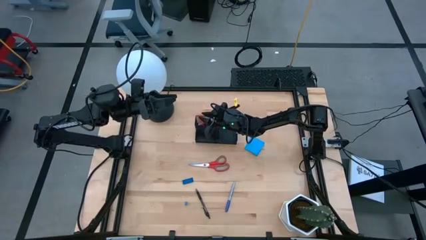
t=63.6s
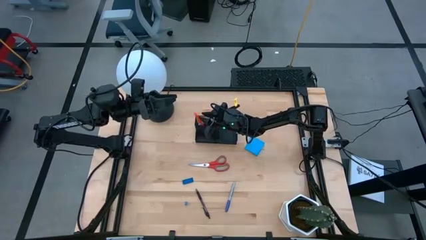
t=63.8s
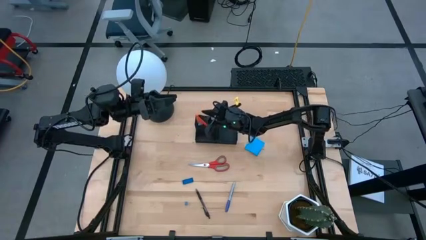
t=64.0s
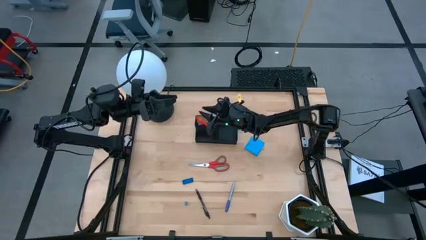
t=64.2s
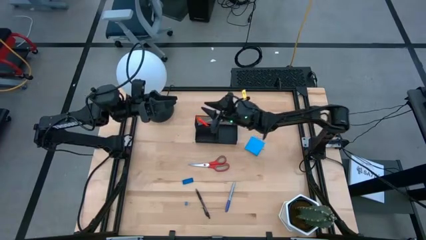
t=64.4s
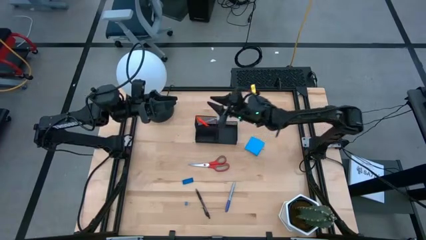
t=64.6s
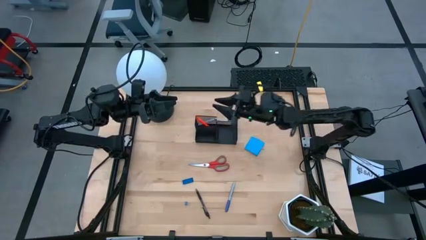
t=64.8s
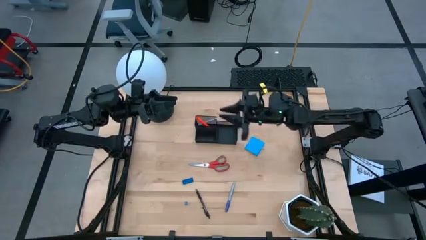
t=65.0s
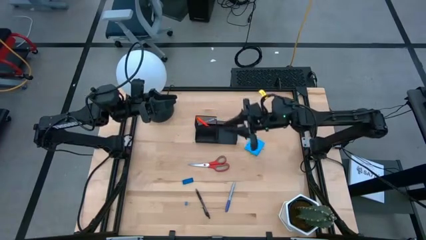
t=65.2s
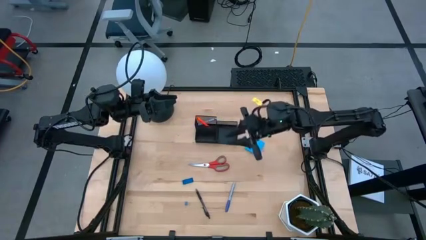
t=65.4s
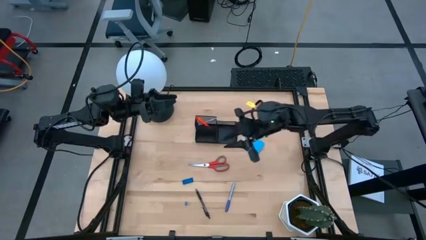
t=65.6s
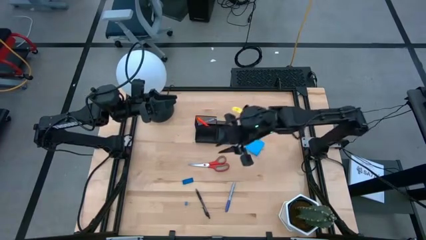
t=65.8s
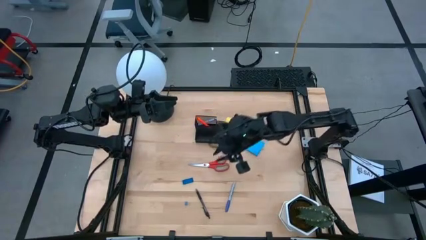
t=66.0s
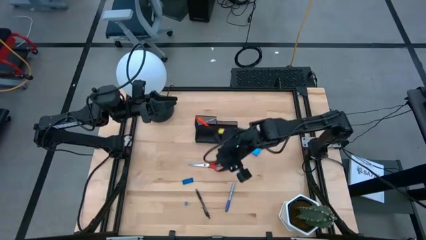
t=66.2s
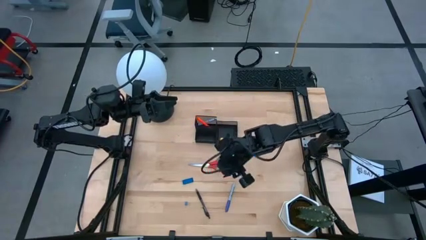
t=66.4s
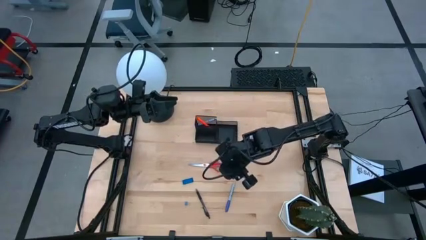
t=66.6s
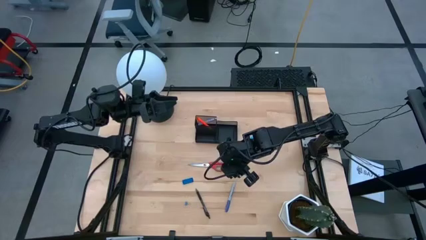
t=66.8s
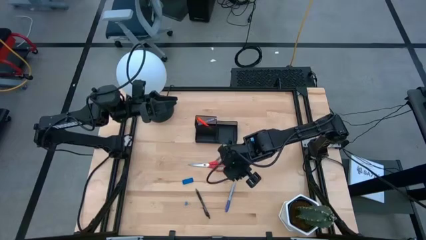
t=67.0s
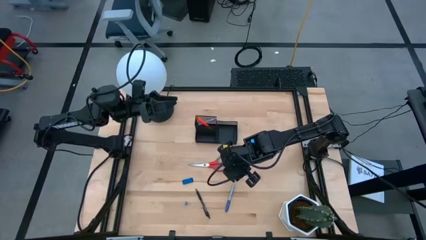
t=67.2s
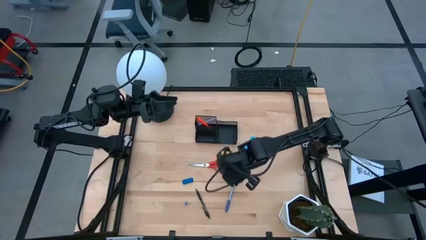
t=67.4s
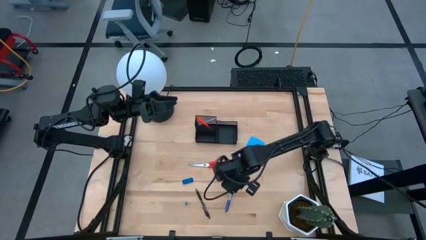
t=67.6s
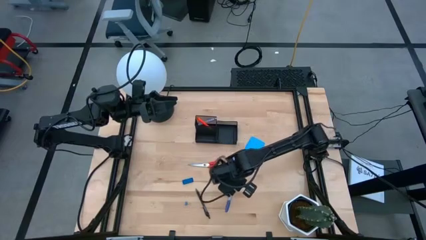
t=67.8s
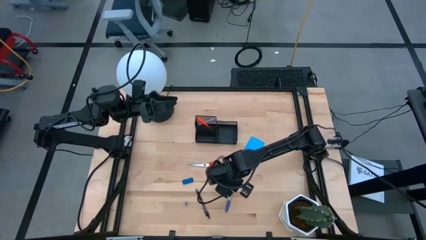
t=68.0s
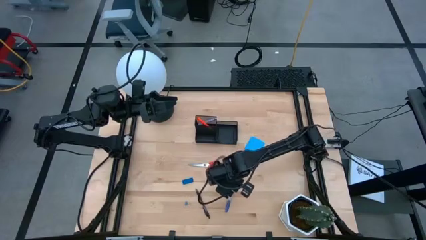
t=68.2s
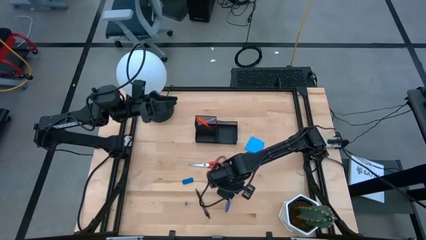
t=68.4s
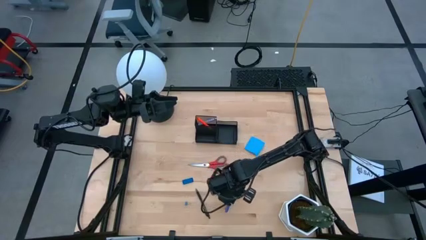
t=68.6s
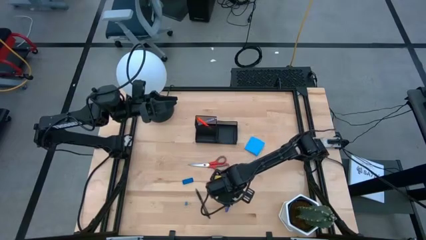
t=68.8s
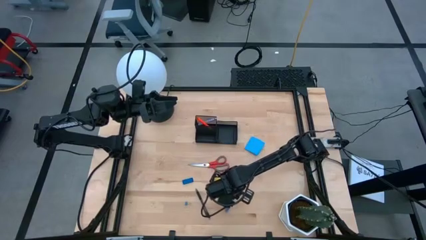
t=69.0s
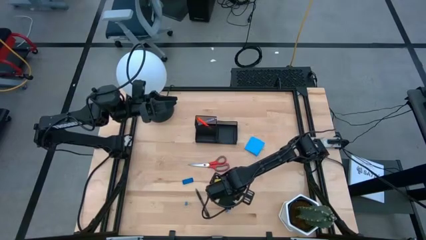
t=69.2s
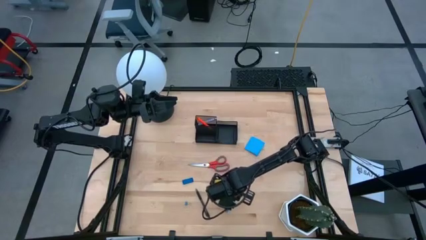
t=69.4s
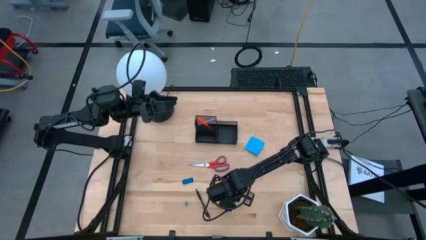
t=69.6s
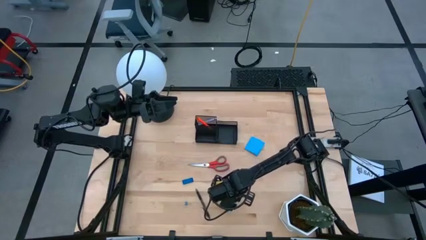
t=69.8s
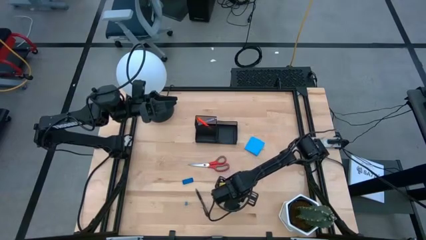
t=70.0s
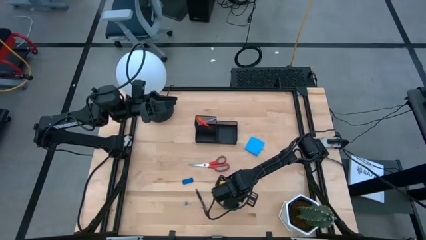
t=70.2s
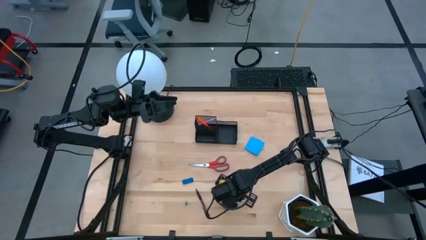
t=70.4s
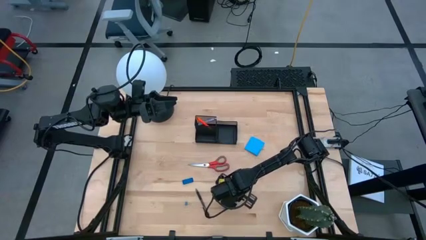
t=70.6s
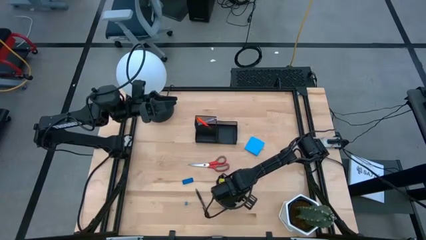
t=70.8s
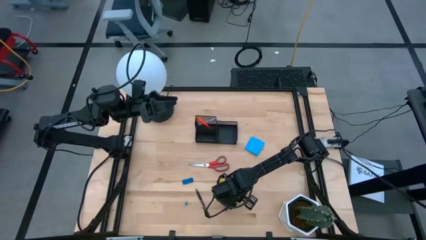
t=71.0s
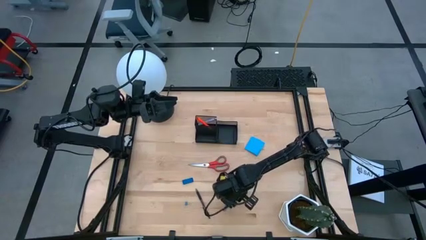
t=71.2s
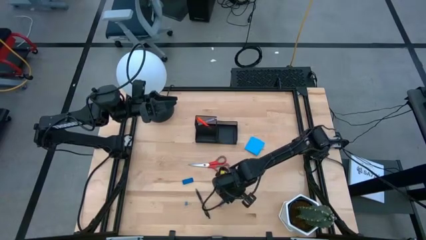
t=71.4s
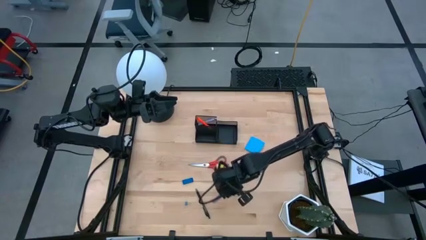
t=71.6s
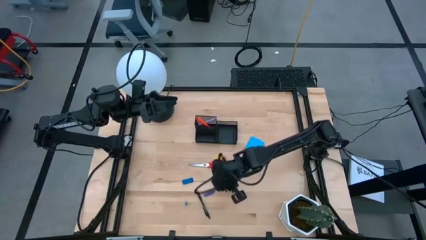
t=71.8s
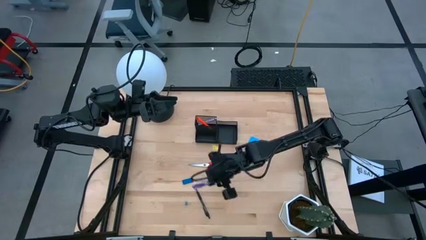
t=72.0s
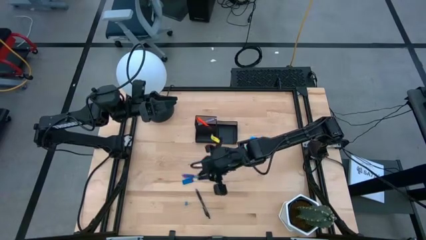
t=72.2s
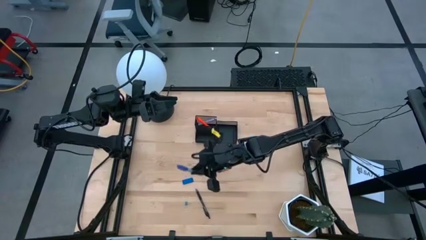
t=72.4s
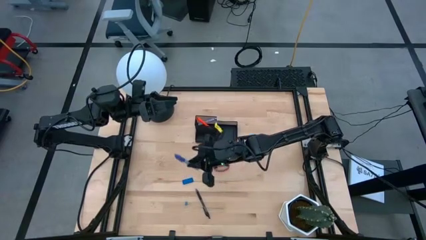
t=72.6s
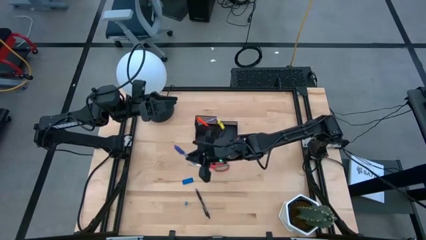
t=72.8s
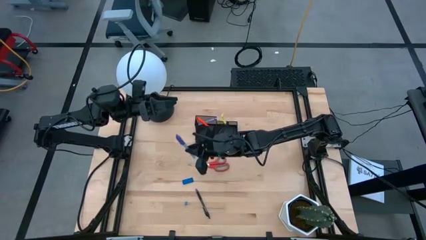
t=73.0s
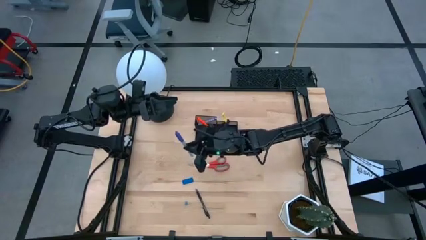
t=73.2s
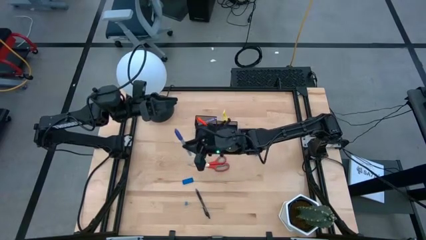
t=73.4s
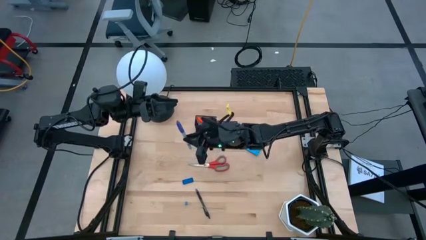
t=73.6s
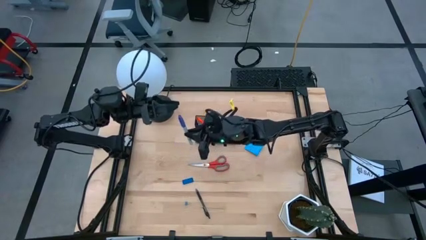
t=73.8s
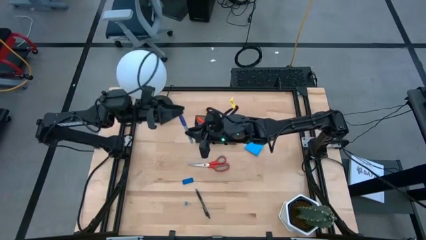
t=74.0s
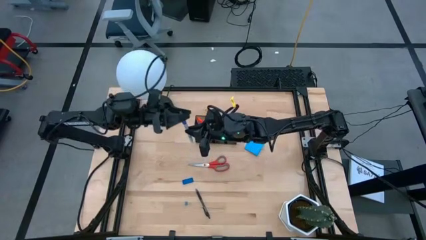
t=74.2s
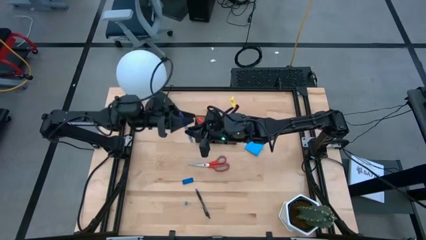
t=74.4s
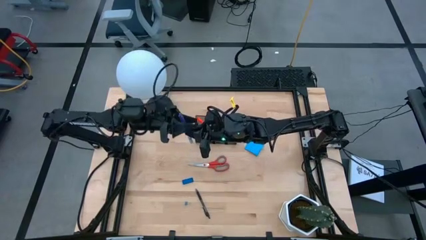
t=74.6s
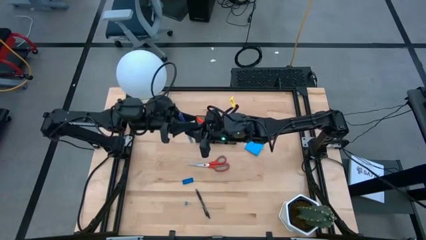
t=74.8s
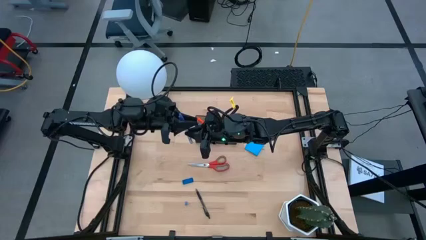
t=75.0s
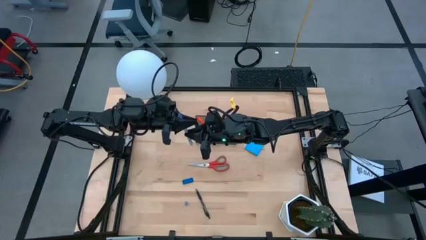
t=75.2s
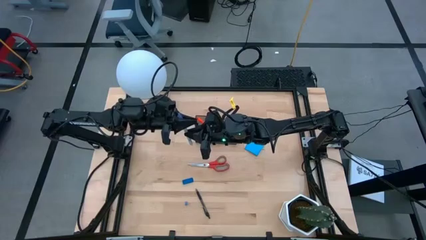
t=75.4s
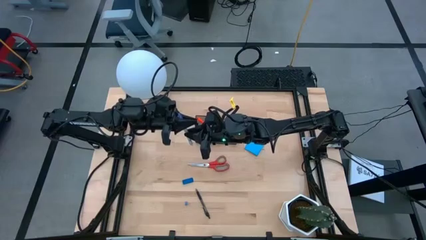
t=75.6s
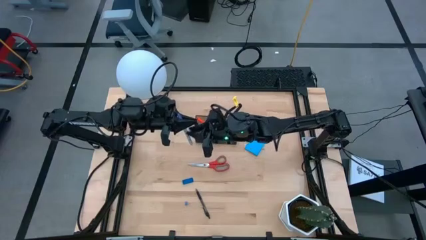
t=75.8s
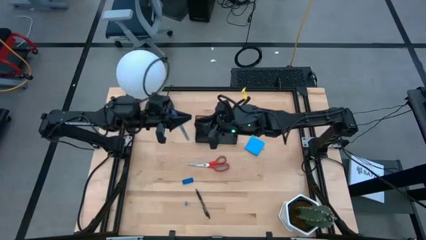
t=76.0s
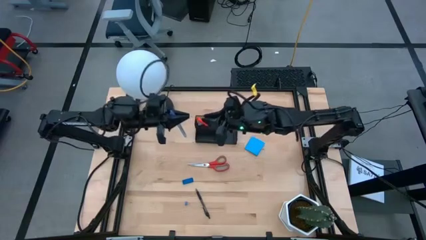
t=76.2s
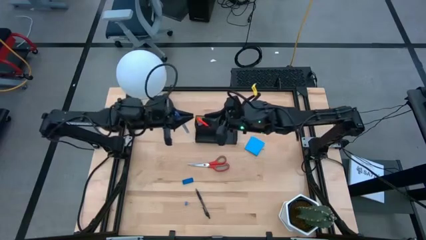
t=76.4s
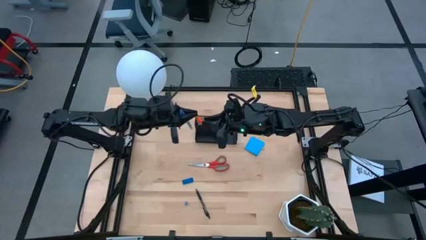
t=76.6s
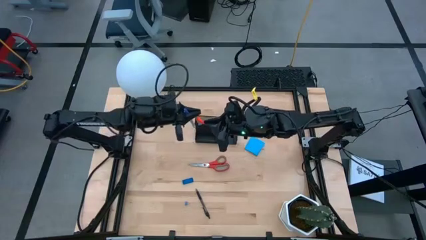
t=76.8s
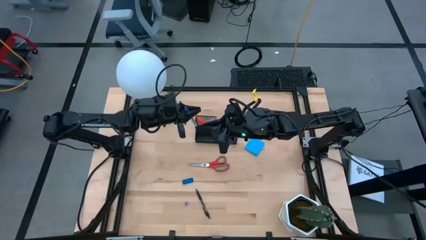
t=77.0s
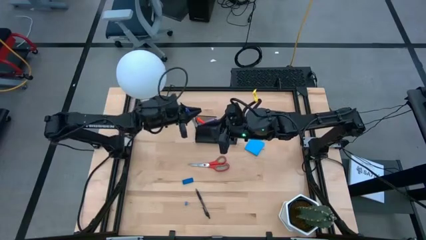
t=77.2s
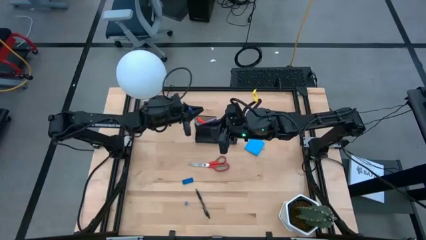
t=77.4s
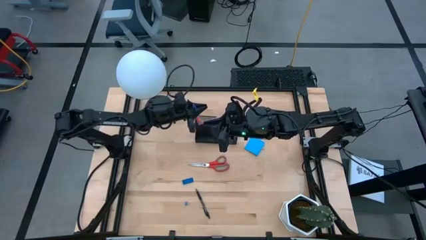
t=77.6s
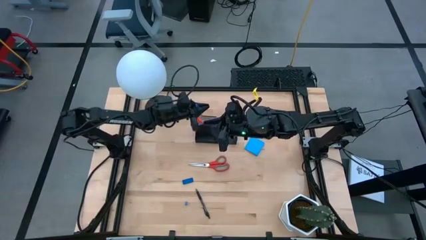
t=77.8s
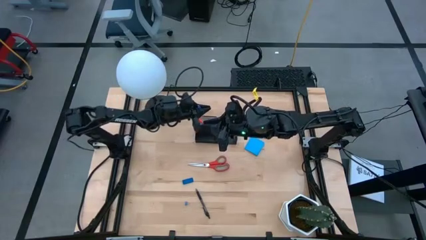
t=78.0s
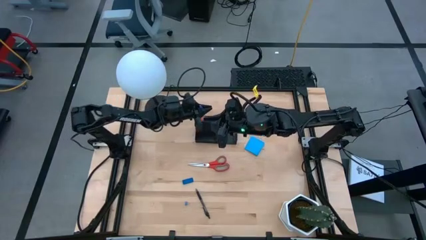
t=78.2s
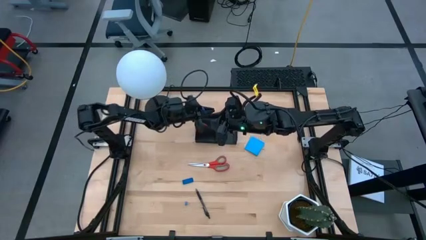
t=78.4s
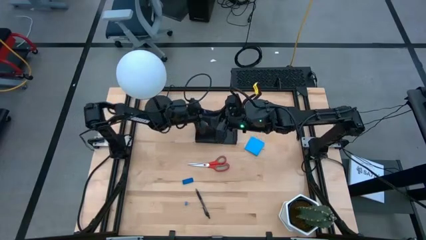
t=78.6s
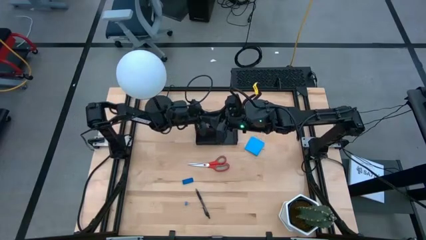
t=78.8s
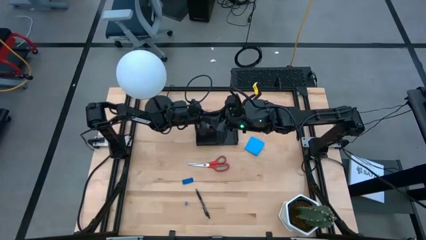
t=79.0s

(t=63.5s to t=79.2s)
Task: Pick and place office supplies into organizer
Put the purple marker into the black desk organizer

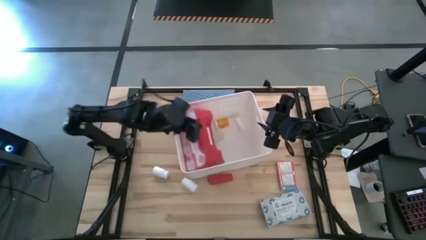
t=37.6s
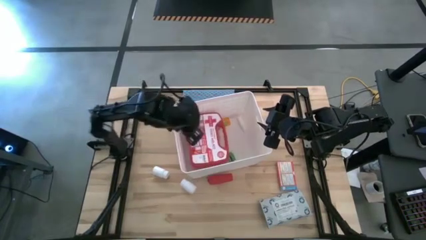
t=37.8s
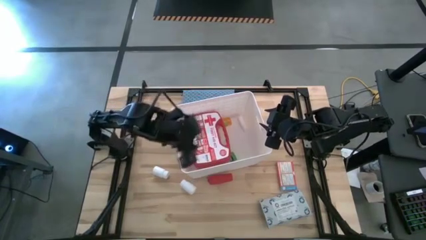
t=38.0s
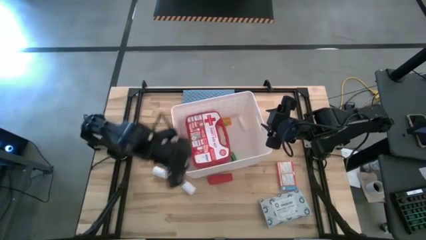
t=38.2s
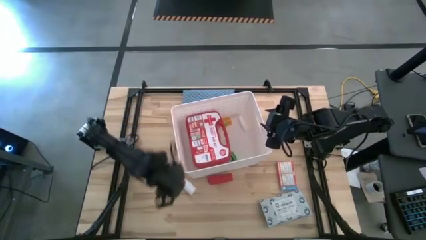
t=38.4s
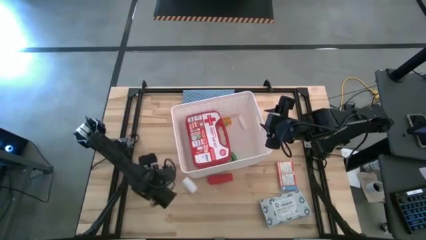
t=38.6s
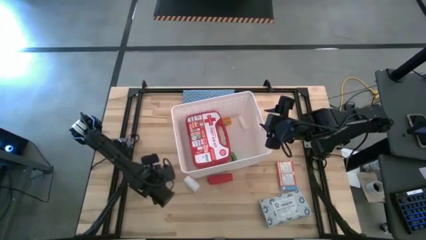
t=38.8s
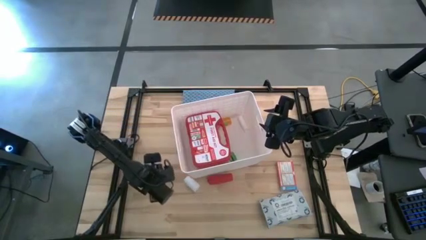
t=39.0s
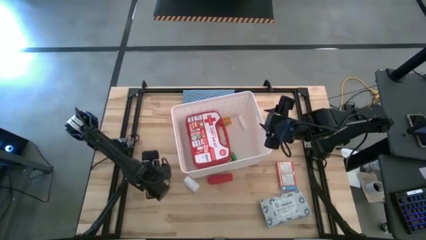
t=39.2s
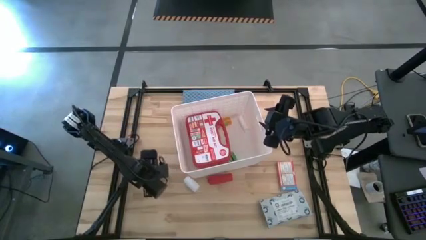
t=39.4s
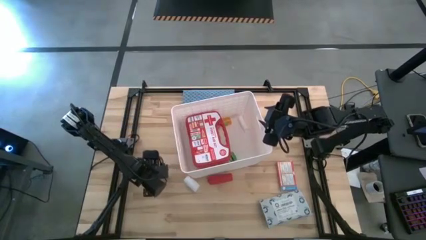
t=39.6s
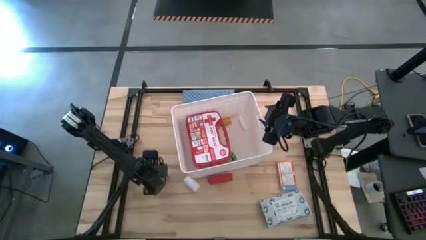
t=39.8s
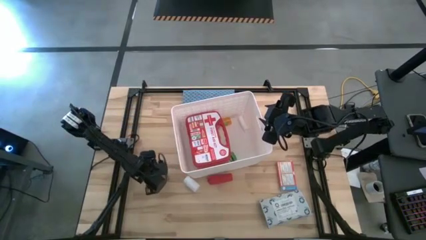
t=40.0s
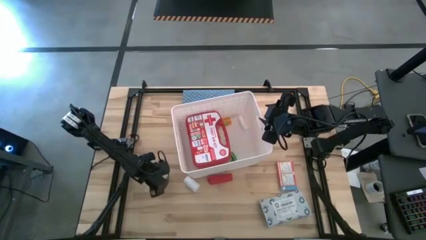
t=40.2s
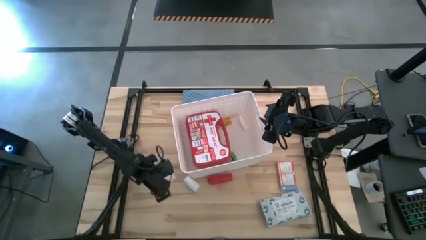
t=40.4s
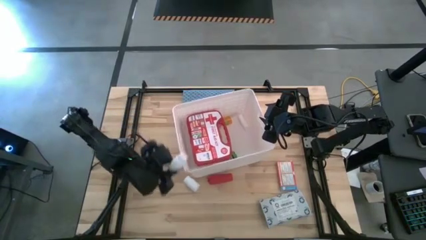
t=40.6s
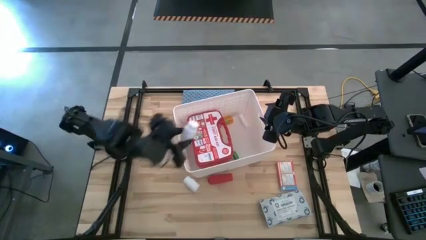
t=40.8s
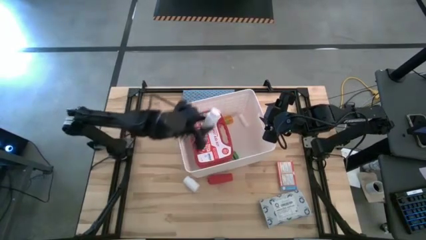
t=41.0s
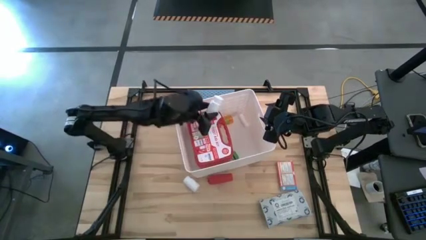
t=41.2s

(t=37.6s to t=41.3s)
Task: Pick & place medical supplies in basket/bin
Put the left white pill bottle into the white basket
